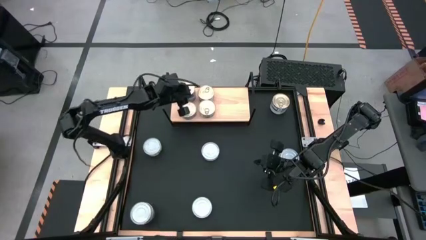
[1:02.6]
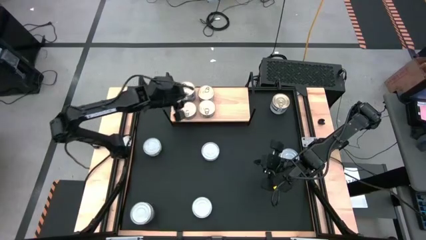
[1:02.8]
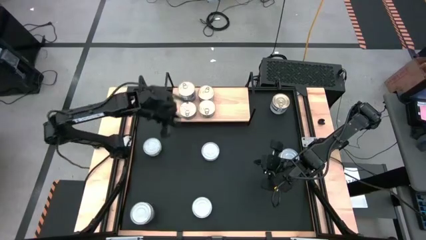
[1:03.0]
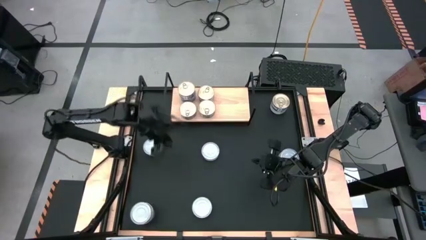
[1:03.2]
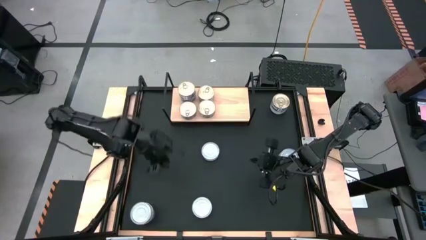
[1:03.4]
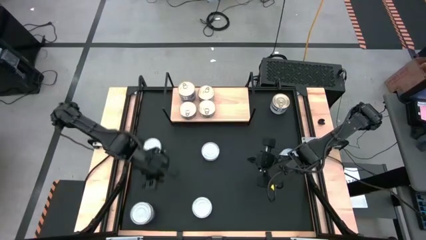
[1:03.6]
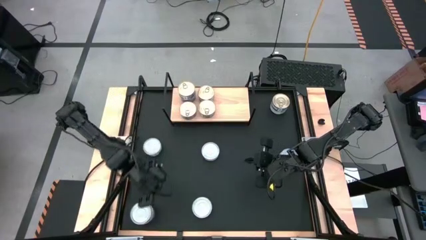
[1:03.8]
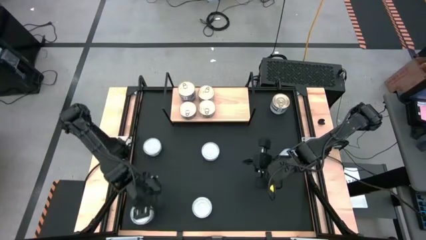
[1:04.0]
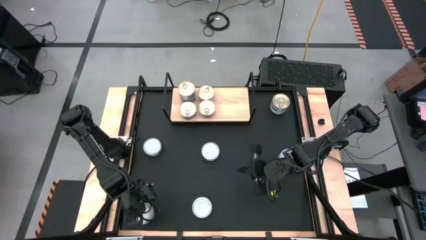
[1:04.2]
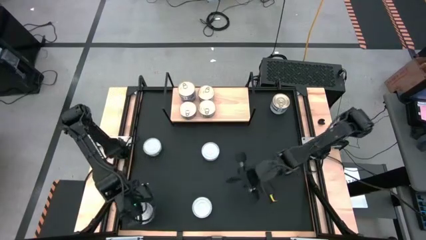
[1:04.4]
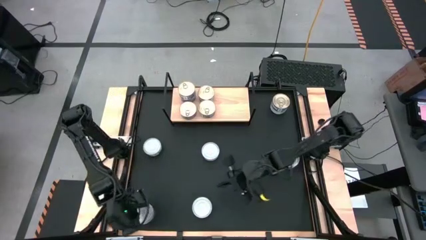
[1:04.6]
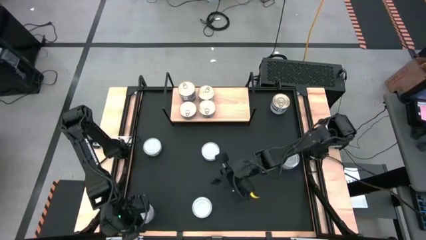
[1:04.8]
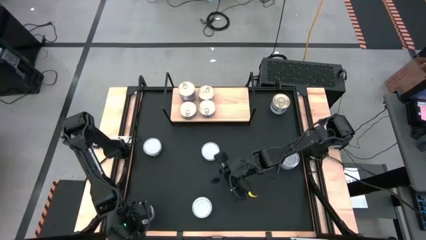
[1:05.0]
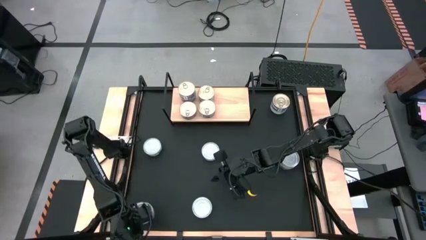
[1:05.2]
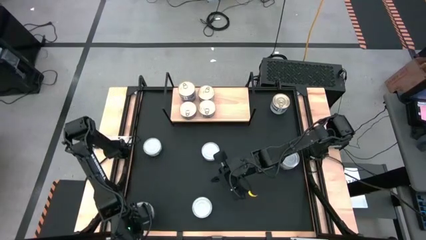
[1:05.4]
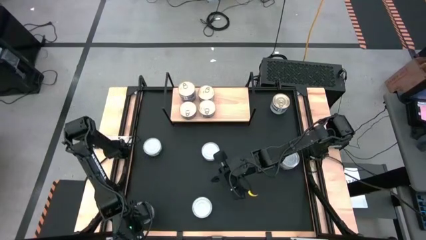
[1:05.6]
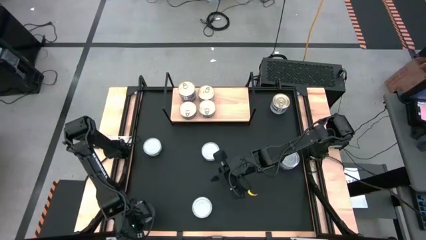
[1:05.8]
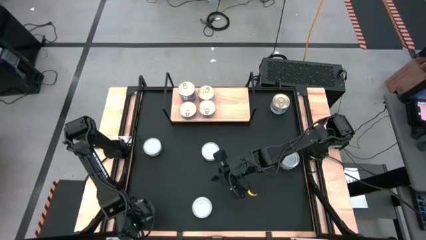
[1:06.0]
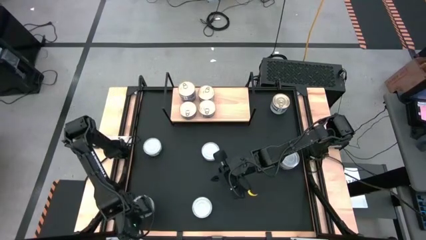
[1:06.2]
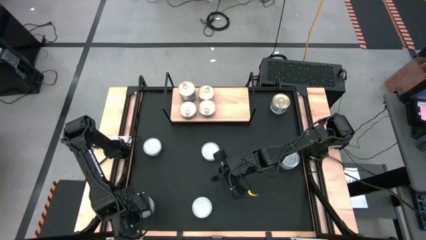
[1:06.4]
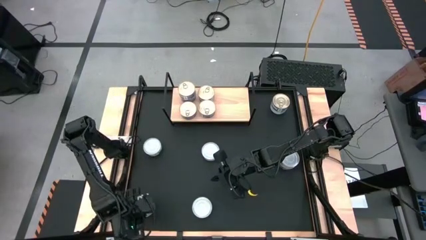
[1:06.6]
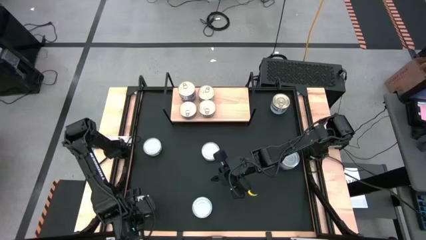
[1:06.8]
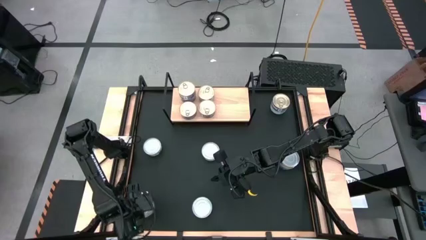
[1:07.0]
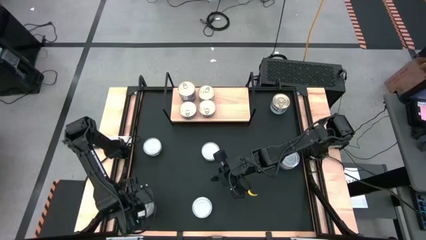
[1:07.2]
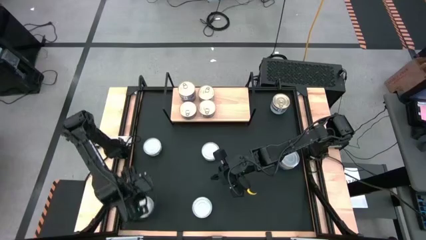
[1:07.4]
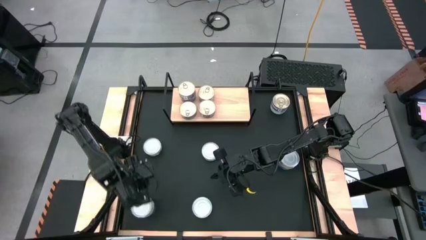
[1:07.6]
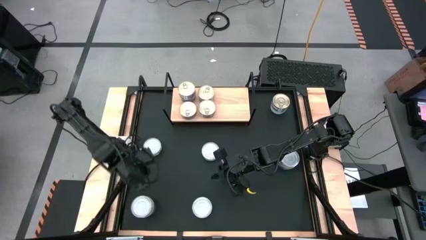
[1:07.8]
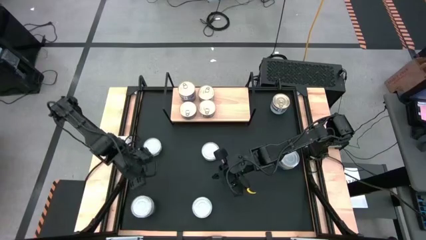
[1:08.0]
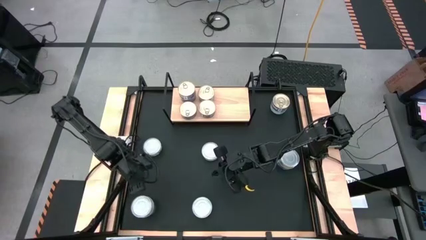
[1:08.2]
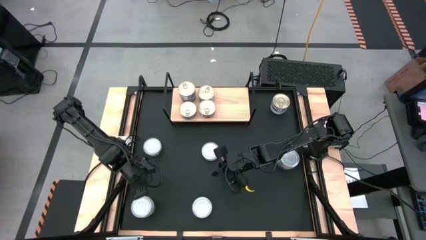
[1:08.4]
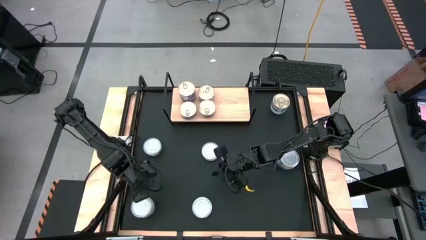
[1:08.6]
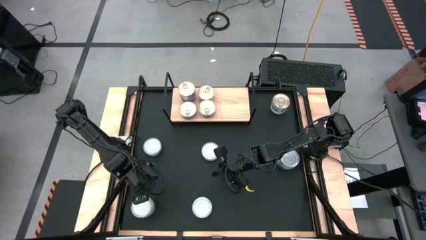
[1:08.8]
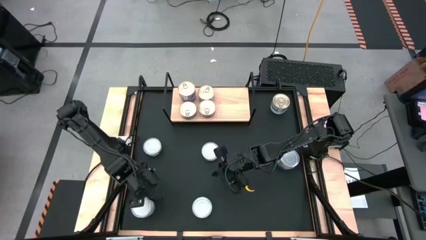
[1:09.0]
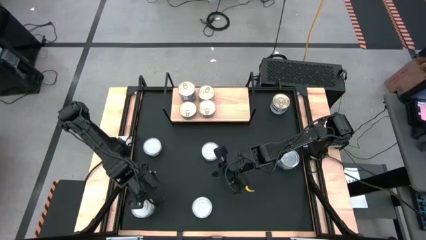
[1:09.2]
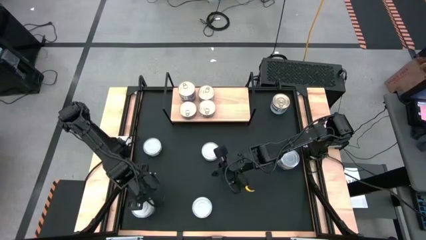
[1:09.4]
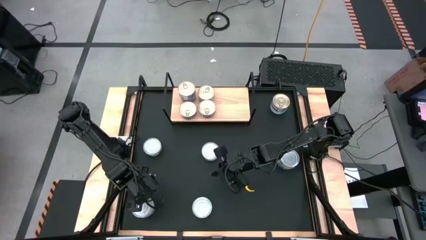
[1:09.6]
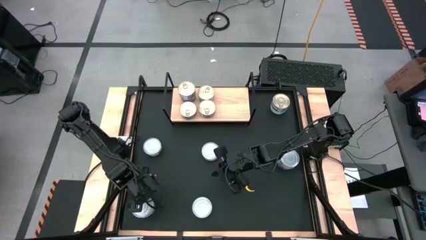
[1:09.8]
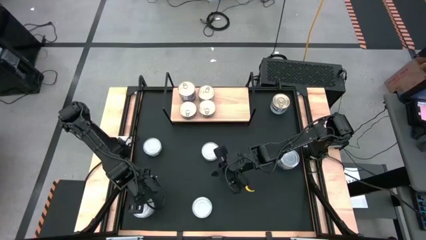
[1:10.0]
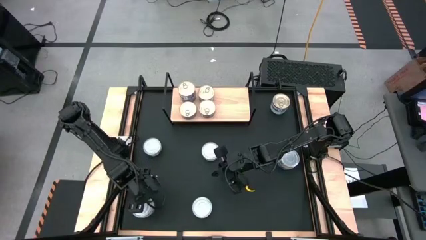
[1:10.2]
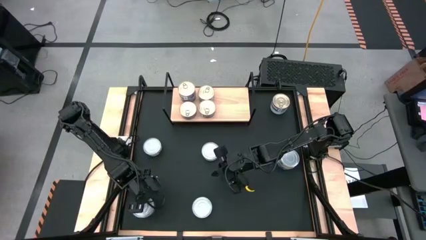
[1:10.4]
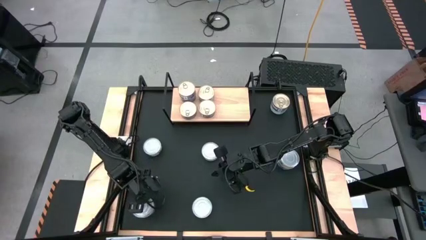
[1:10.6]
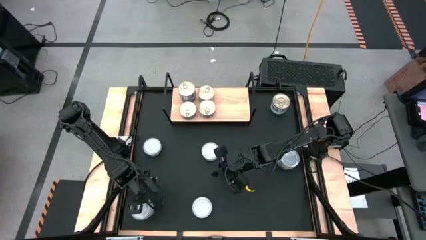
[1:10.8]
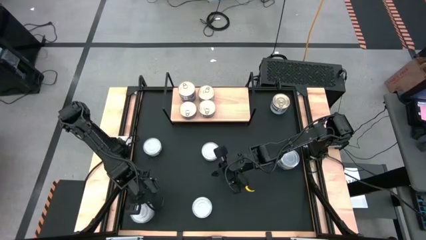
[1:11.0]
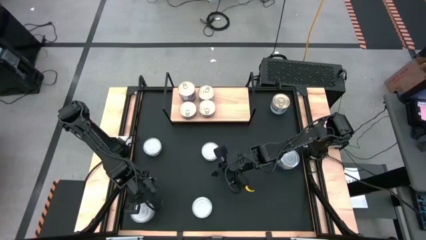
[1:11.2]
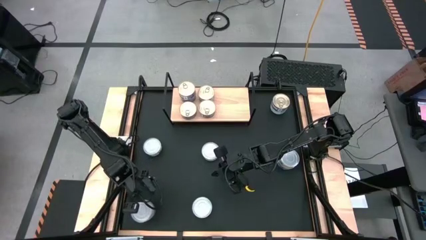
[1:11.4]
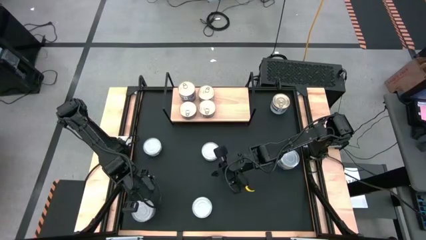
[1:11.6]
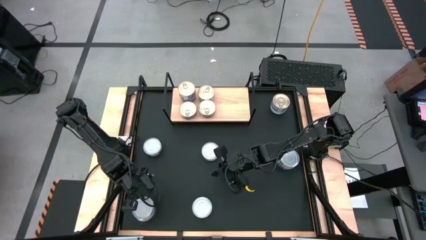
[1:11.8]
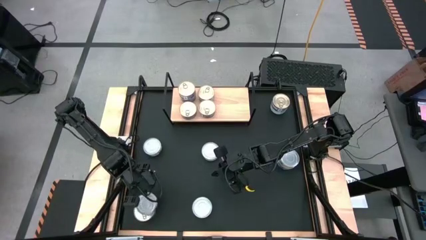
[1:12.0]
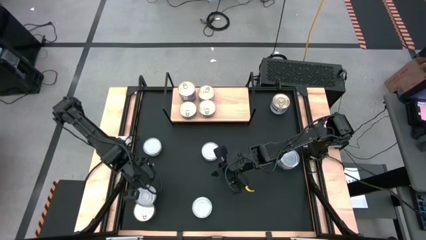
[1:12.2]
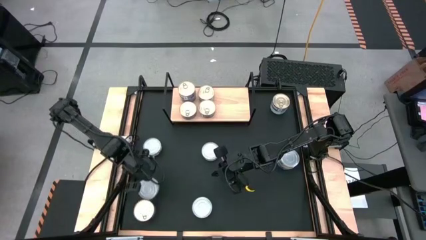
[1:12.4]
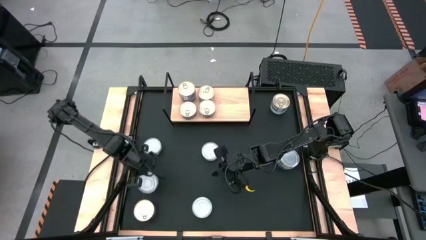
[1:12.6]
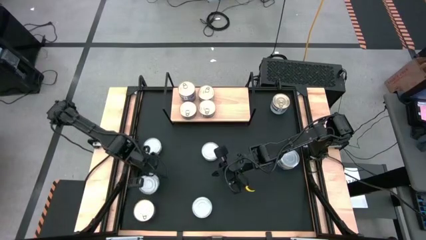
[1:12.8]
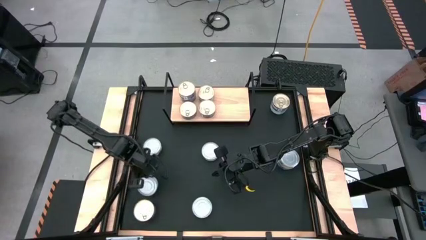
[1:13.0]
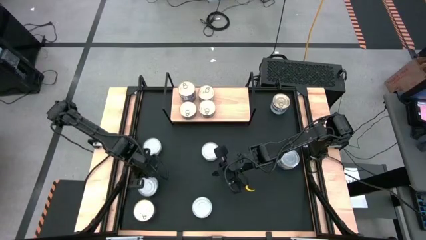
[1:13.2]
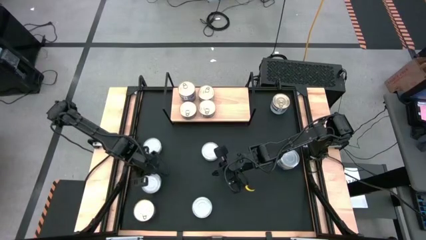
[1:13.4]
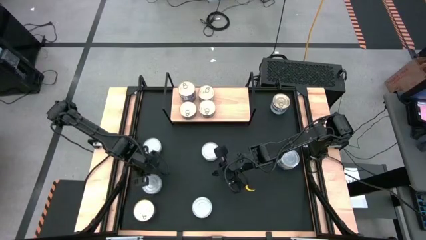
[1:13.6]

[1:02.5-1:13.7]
Task: Stack canned seafood by type on shelf
Remove the green tuna can from the top of the blue tuna can

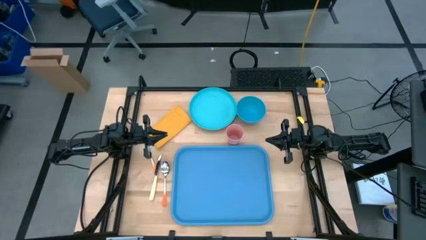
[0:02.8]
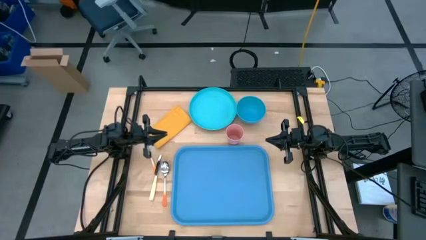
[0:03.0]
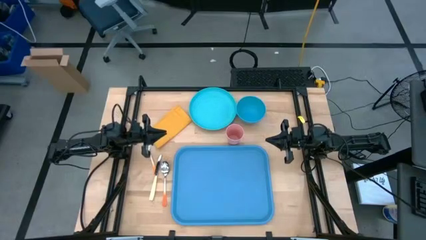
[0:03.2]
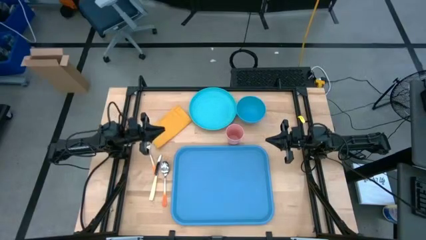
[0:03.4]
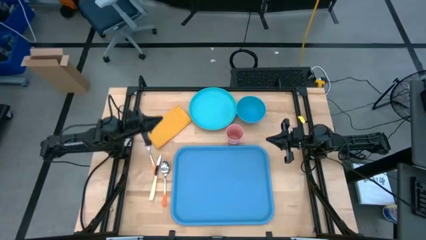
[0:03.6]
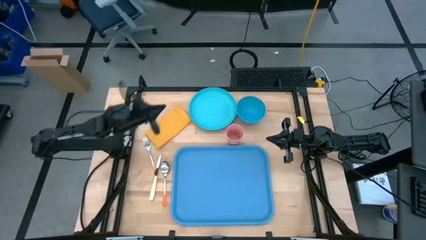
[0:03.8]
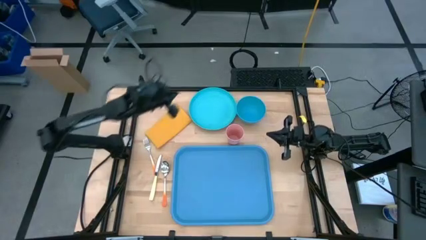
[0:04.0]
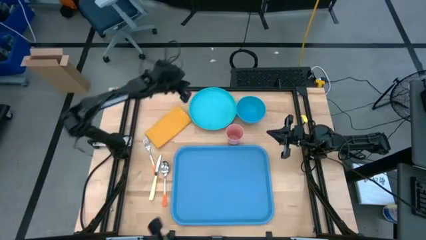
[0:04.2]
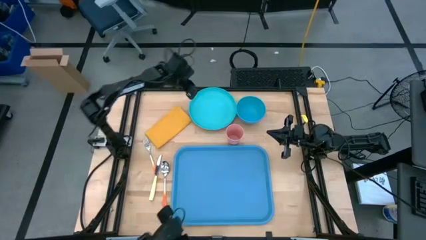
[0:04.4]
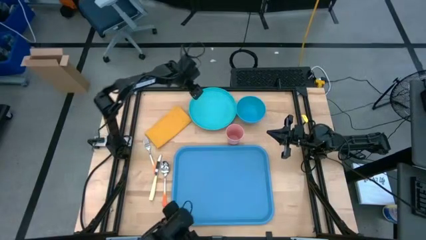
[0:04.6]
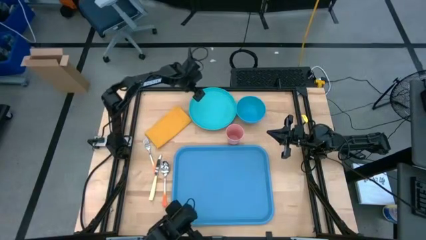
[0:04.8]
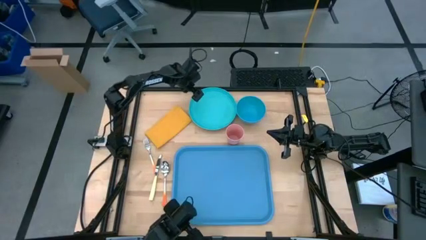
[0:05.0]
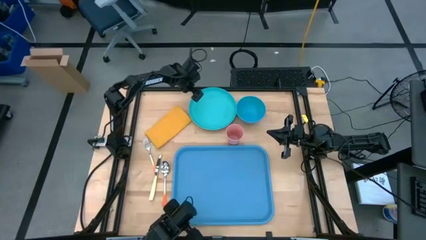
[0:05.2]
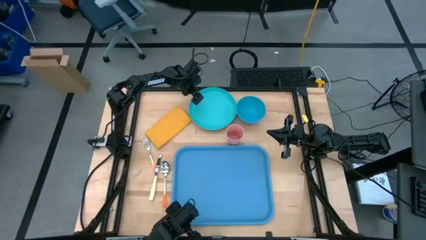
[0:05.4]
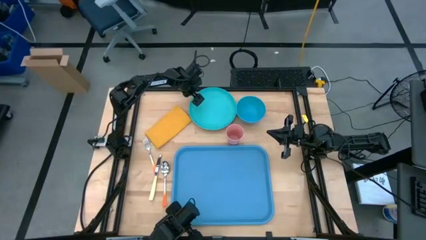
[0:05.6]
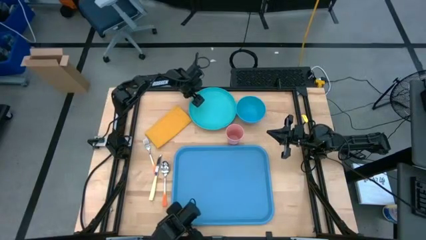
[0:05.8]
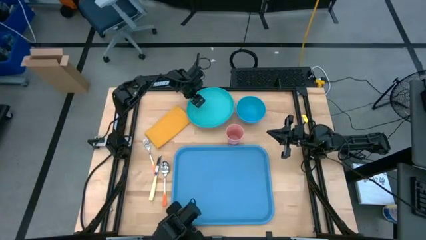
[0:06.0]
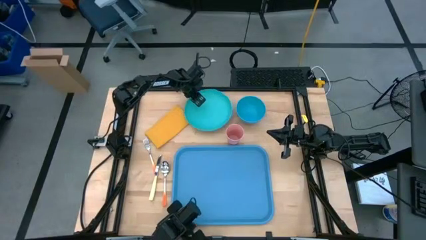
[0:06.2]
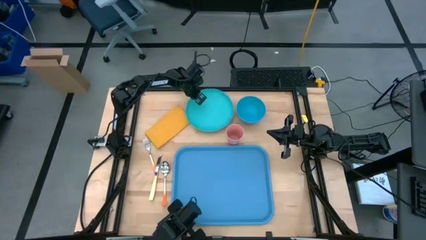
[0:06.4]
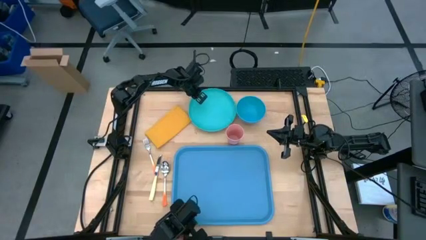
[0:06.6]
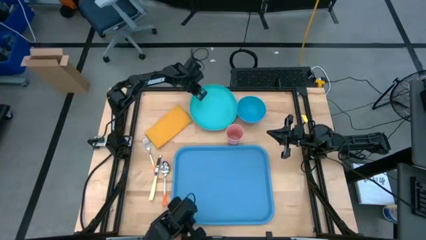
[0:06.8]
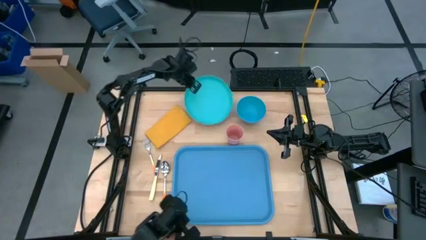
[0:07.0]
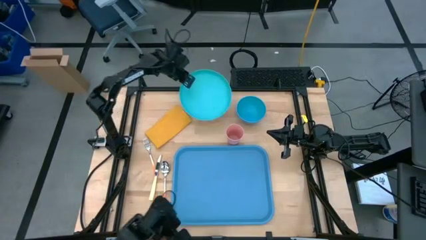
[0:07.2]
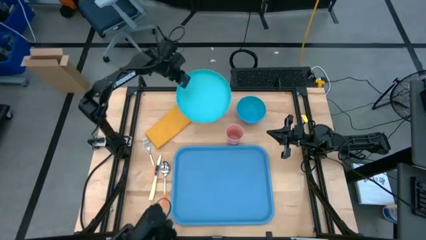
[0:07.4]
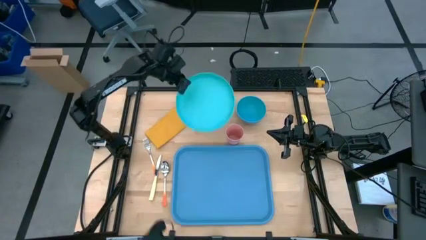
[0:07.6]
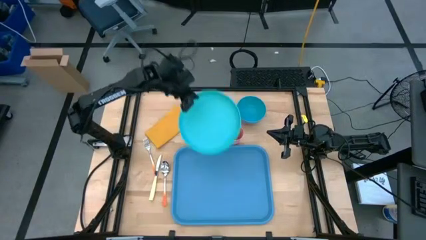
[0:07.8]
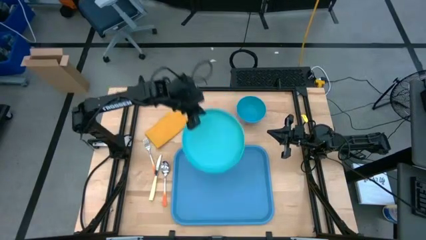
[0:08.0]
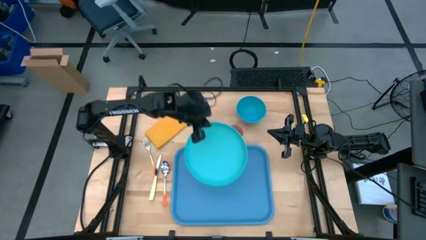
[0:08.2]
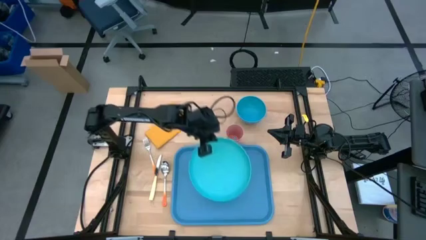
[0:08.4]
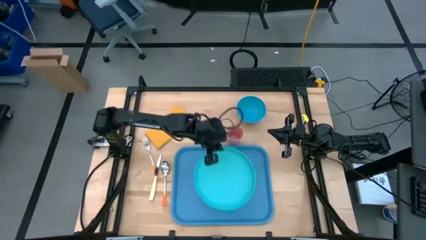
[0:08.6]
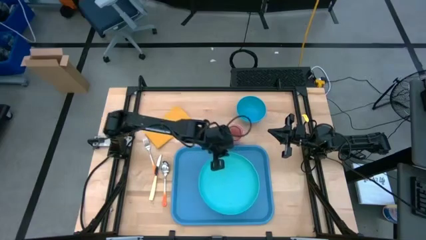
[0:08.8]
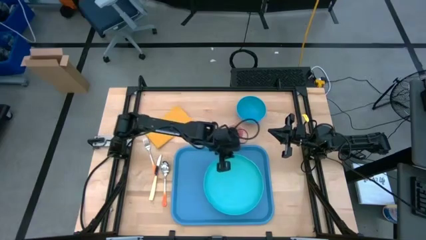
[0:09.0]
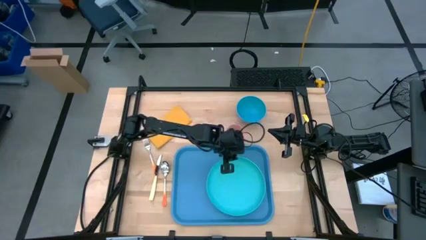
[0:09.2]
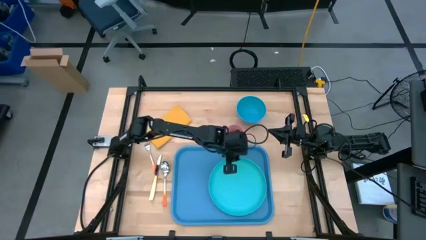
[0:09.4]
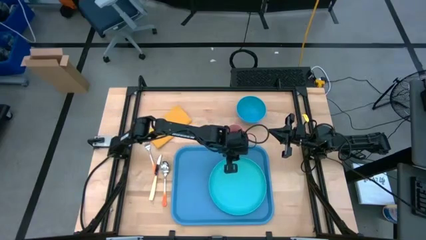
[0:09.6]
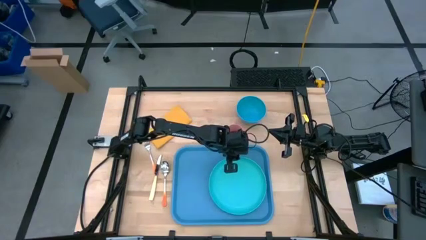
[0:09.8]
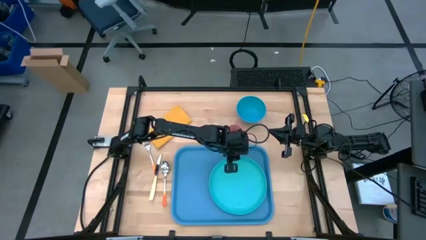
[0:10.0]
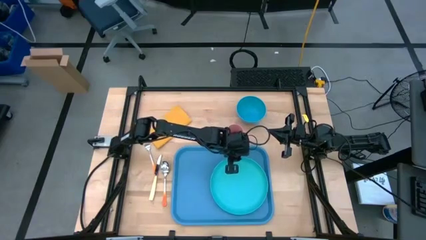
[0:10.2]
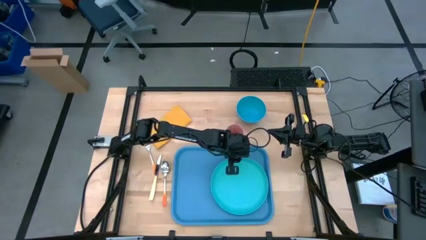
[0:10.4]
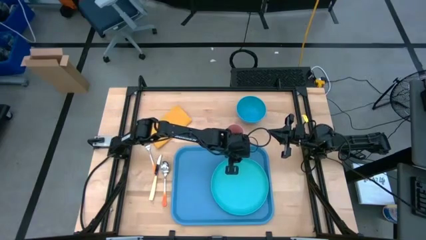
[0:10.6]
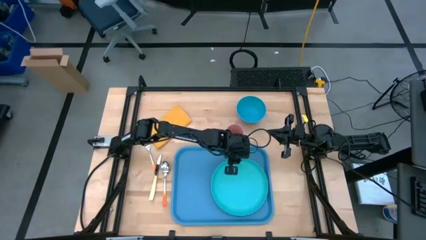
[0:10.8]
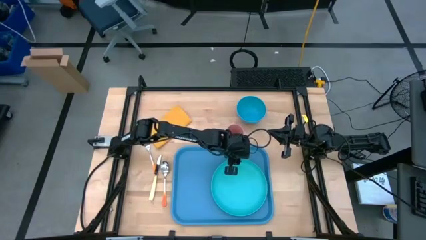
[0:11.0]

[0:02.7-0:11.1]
Task: Set up tray
Put the light blue plate on the blue tray
